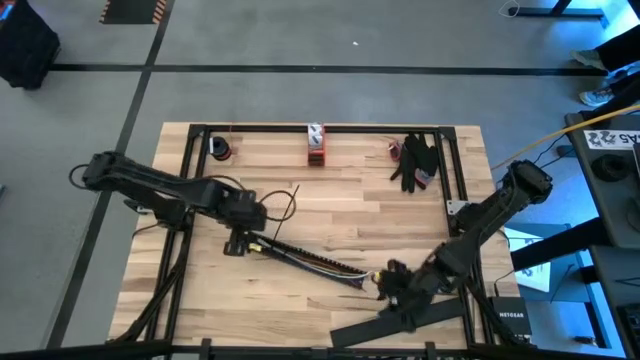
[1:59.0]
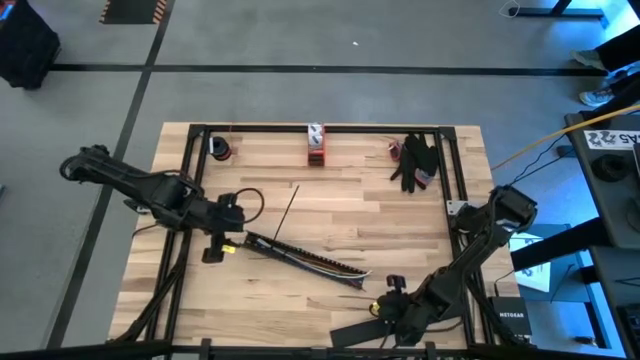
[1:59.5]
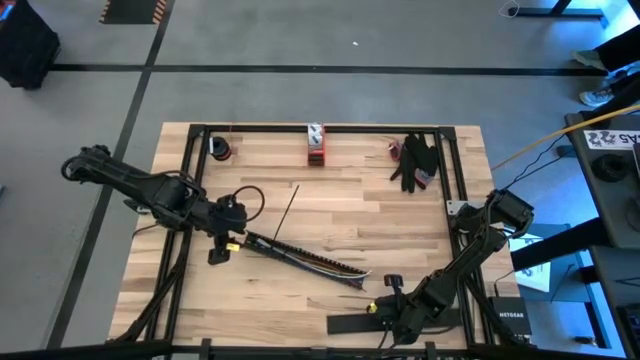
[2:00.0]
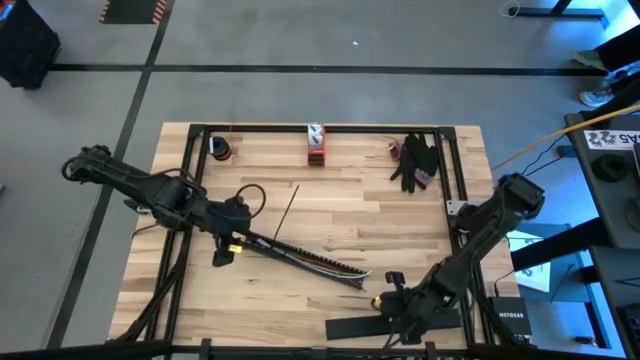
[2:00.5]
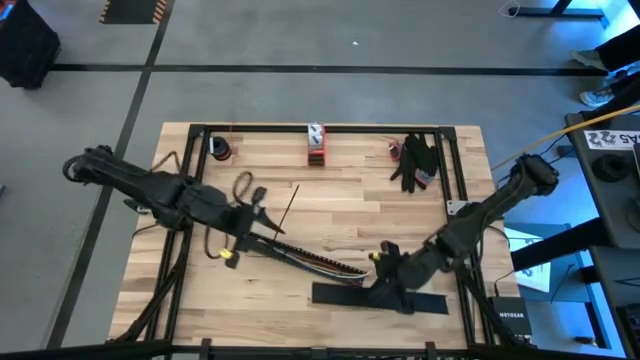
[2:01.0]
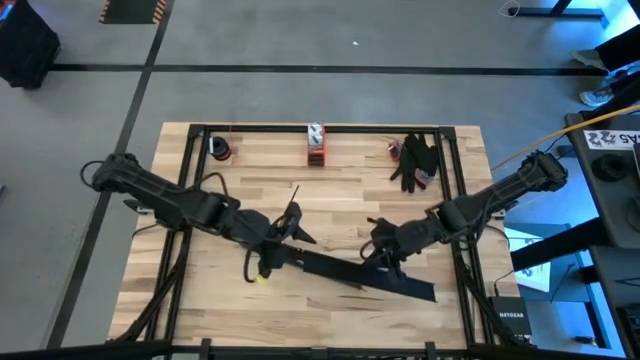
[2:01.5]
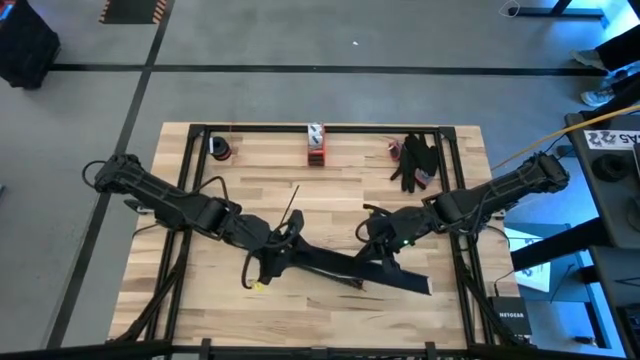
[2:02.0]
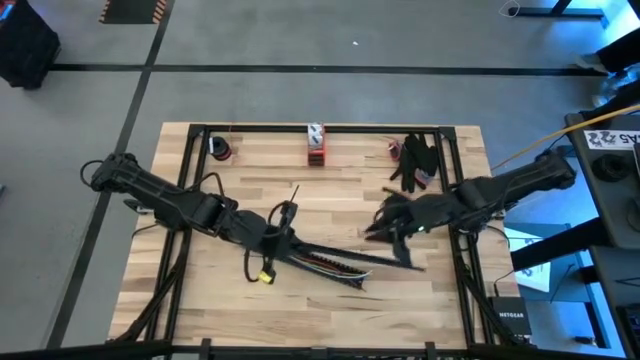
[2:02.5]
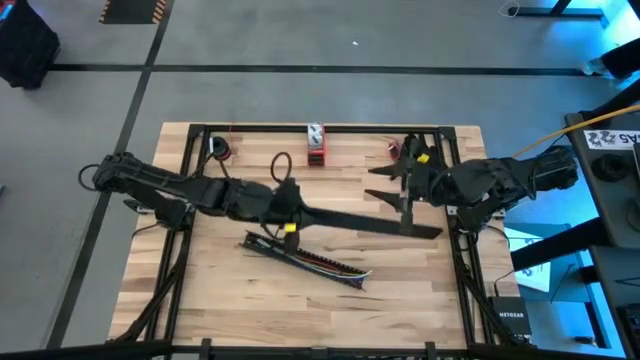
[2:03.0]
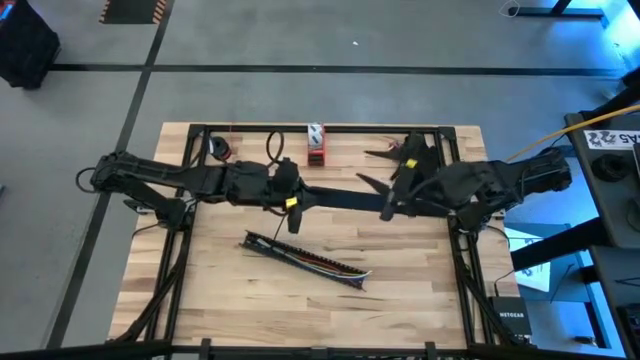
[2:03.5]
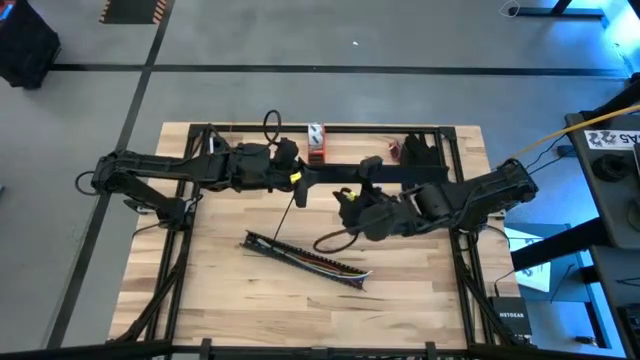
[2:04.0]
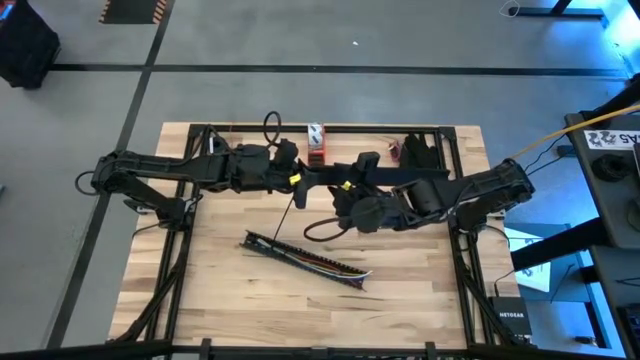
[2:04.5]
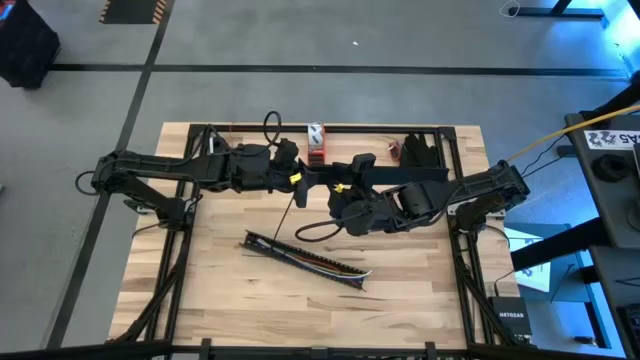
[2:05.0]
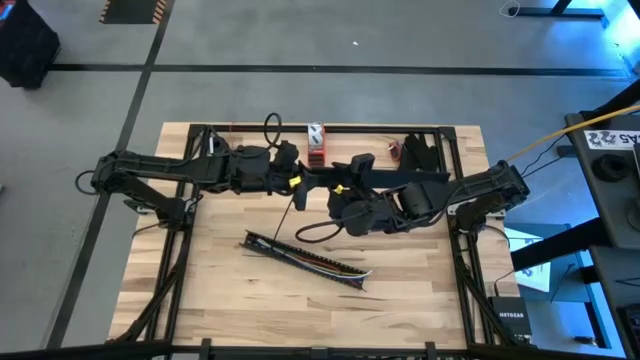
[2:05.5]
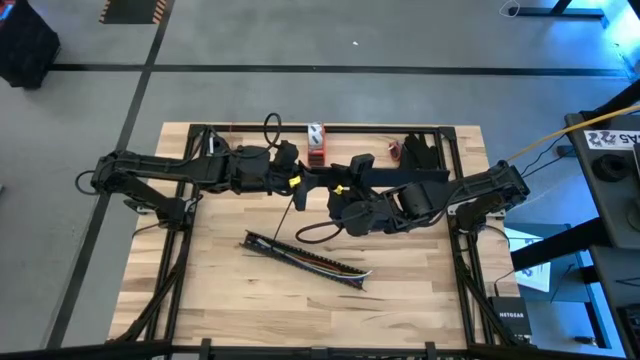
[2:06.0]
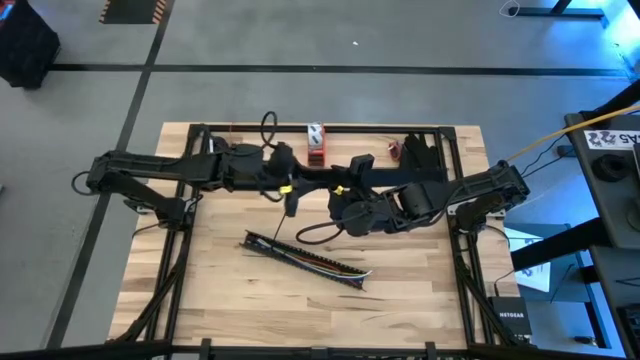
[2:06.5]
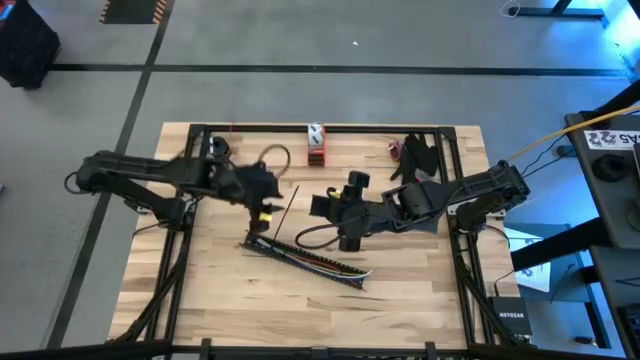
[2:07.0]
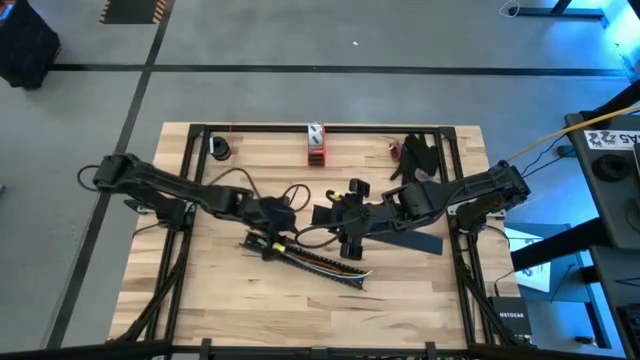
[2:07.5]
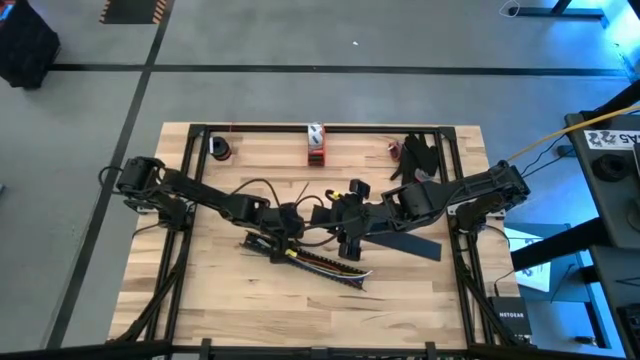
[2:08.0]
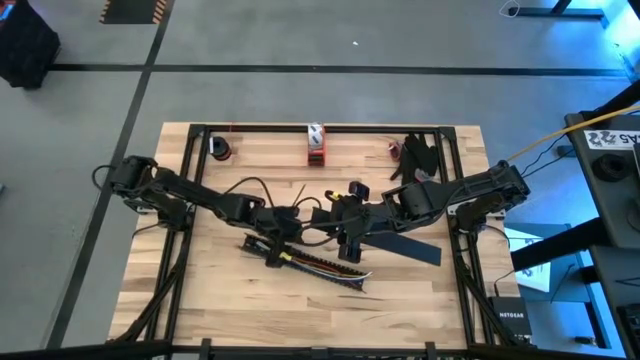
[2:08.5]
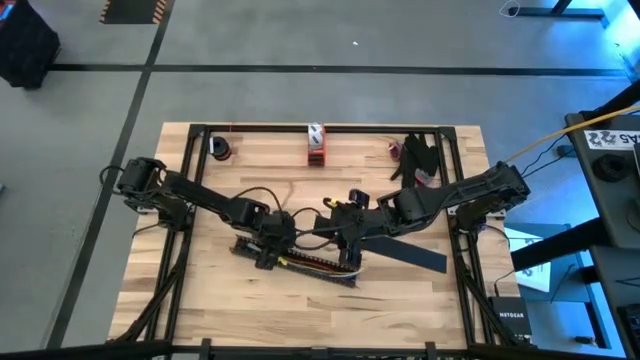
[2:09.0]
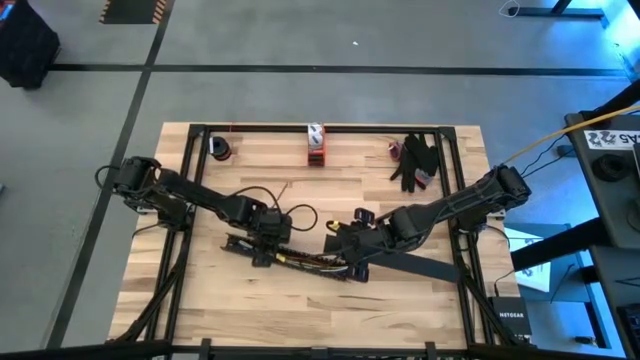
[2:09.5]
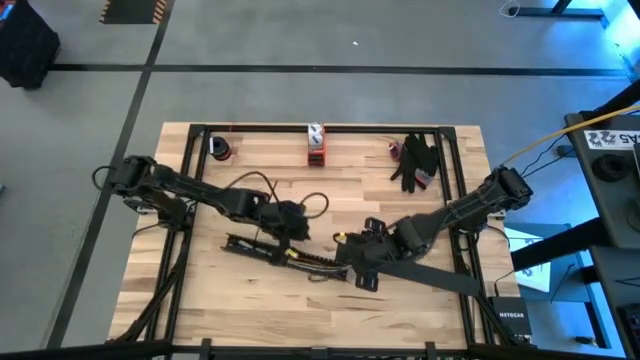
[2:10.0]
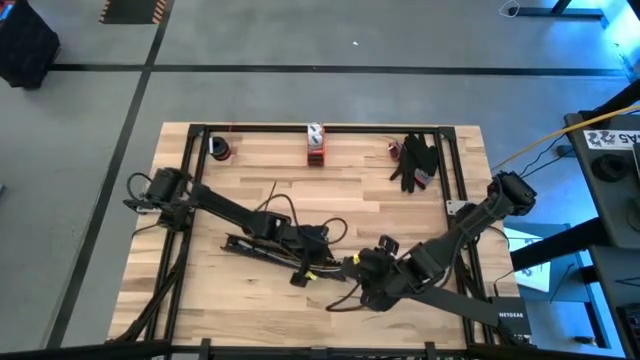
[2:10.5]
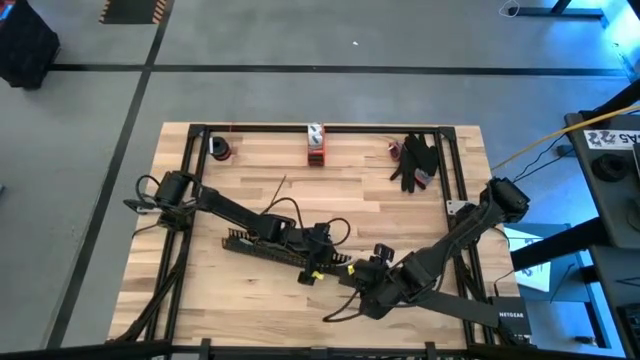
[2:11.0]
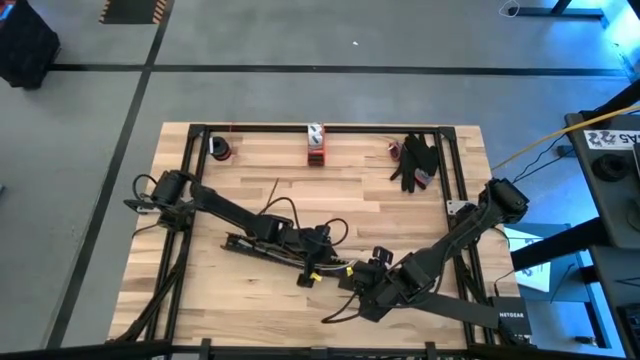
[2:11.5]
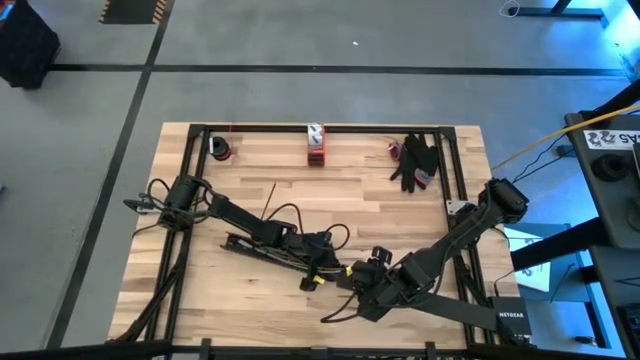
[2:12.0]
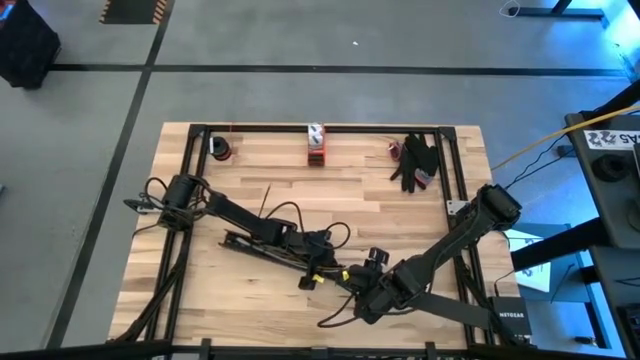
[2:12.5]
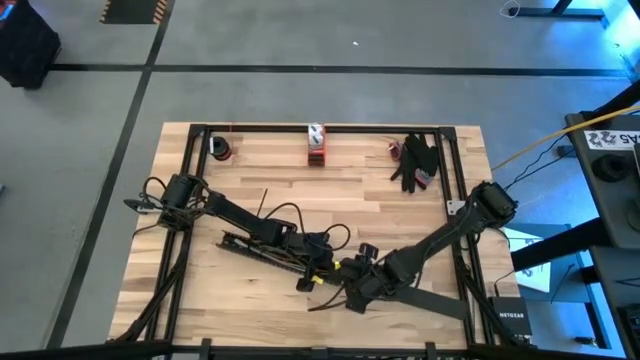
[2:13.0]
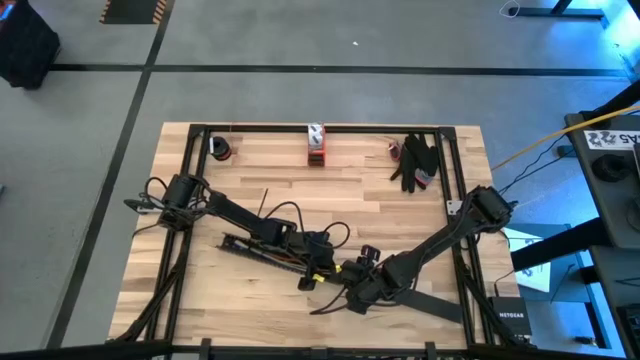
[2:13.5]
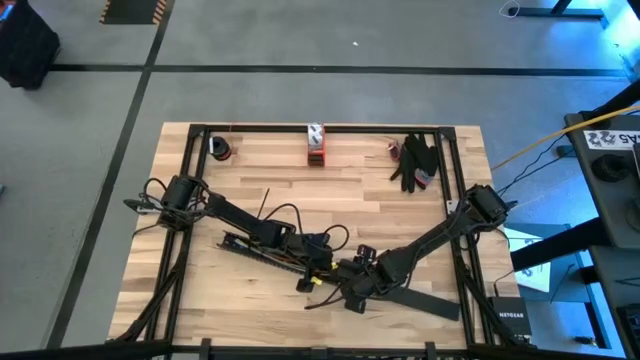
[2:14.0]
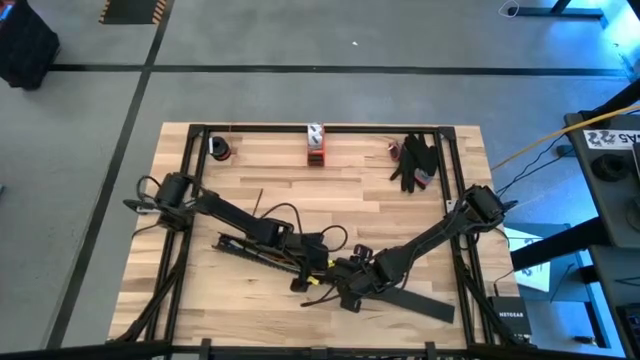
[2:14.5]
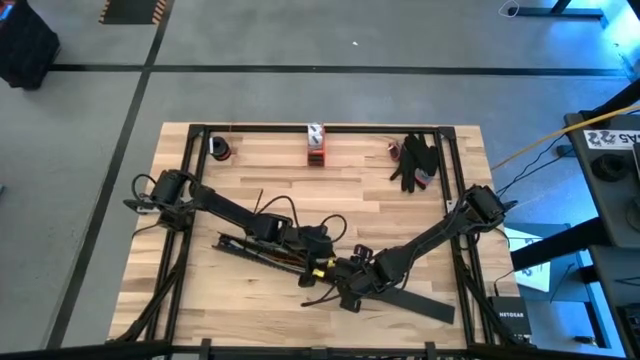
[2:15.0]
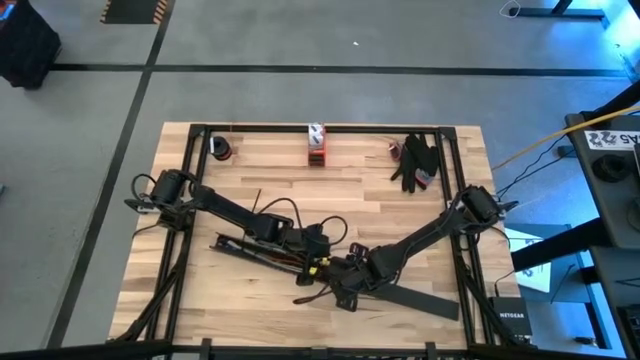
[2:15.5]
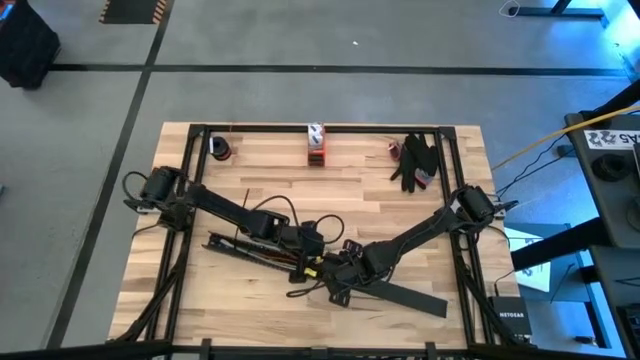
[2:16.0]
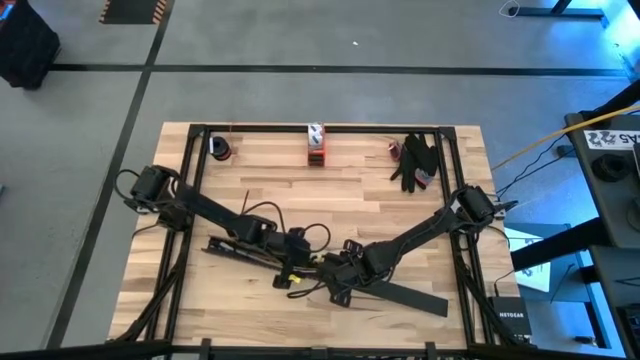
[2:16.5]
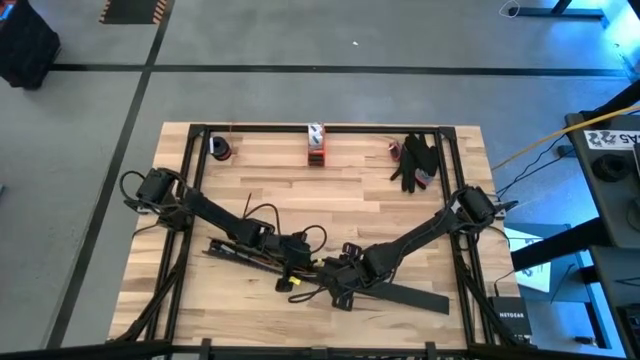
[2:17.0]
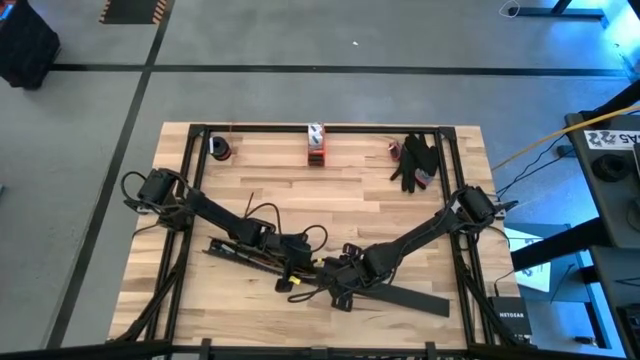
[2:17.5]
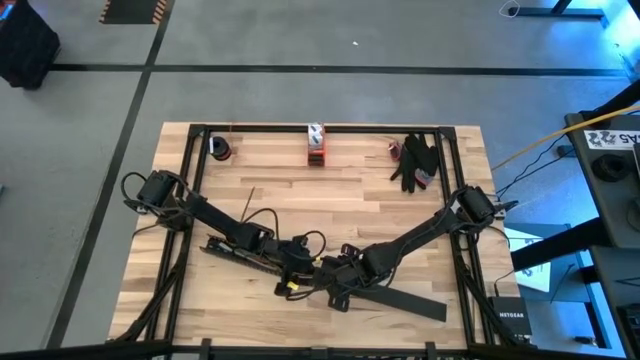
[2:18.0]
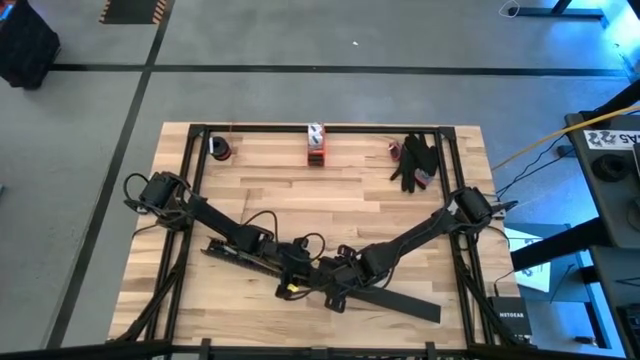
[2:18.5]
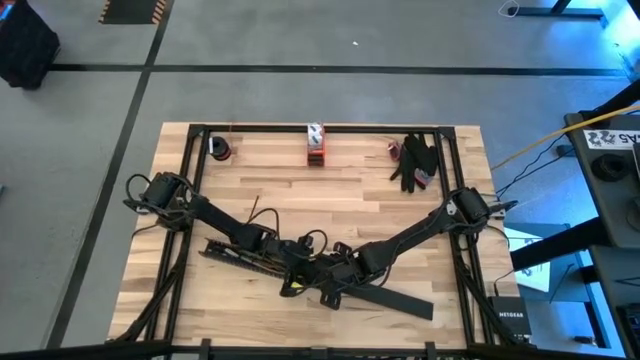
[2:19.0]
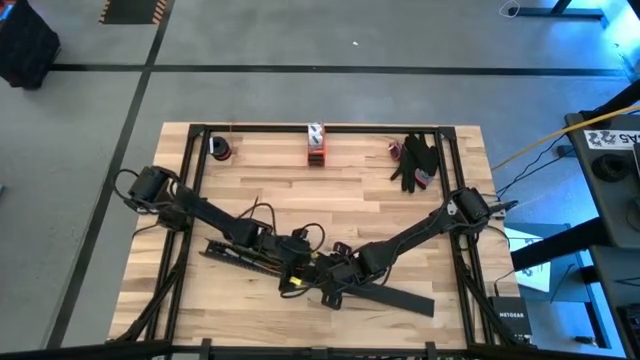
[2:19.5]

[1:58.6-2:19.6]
Task: Ziptie cables
Insert the black cover of the black cable duct
